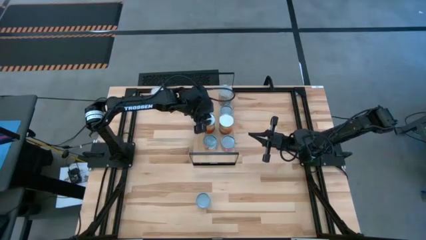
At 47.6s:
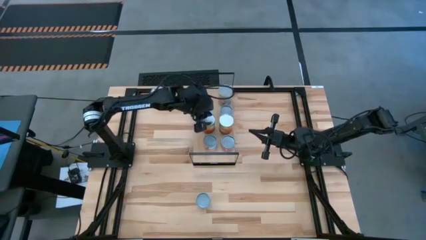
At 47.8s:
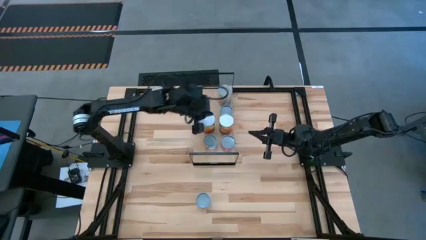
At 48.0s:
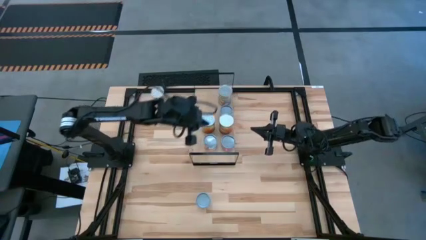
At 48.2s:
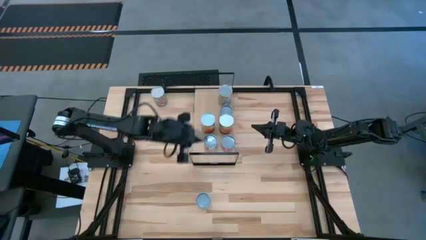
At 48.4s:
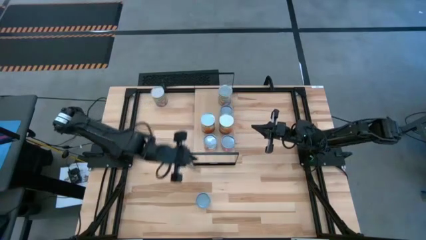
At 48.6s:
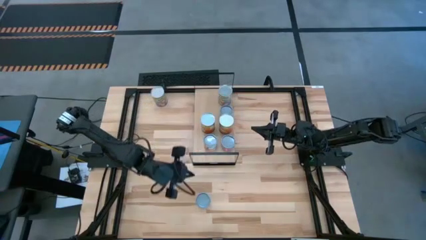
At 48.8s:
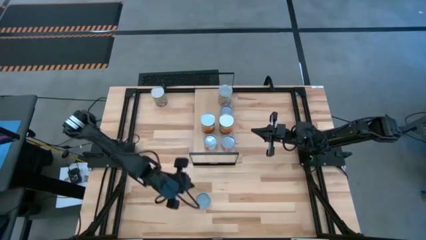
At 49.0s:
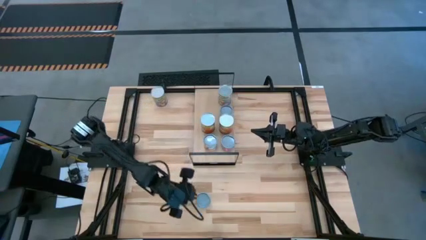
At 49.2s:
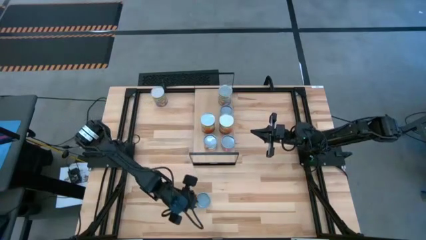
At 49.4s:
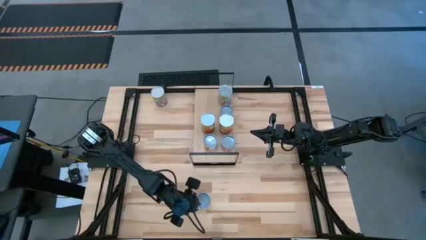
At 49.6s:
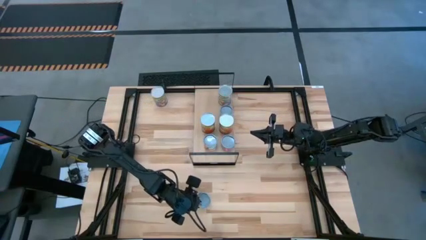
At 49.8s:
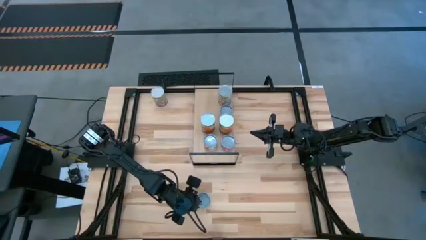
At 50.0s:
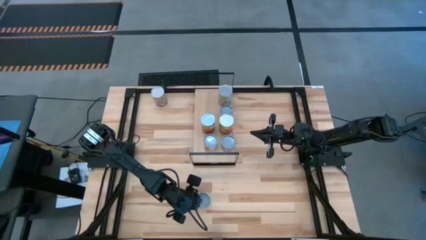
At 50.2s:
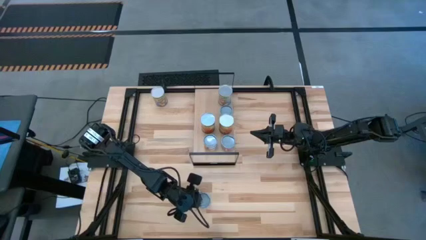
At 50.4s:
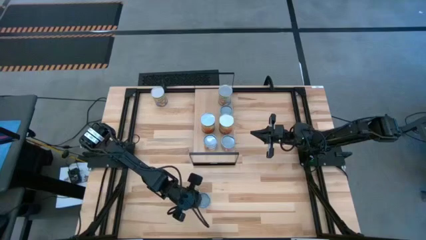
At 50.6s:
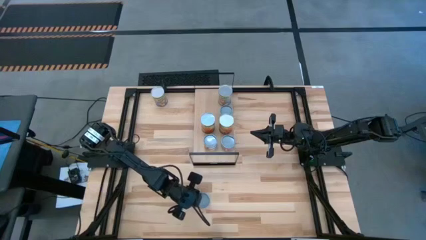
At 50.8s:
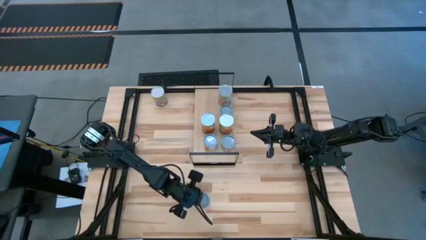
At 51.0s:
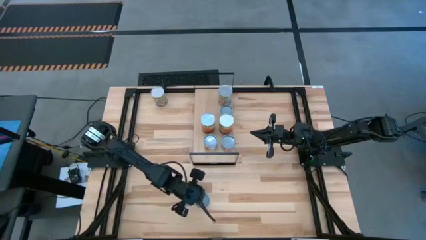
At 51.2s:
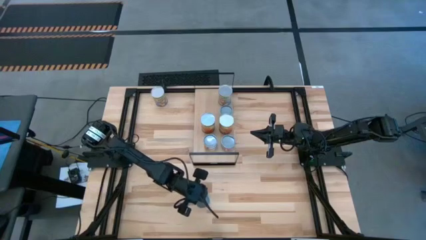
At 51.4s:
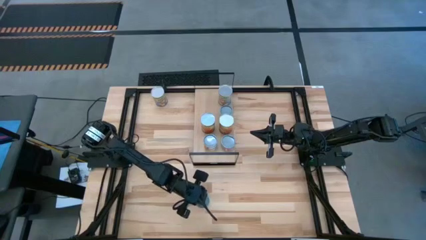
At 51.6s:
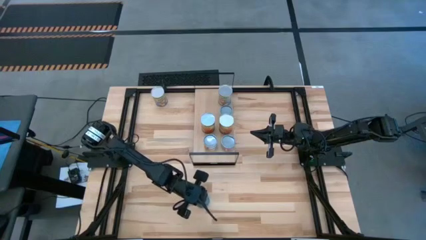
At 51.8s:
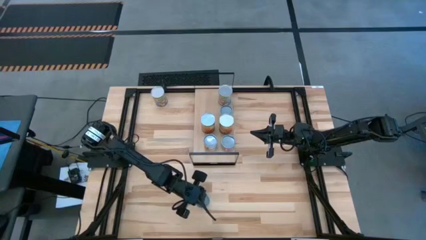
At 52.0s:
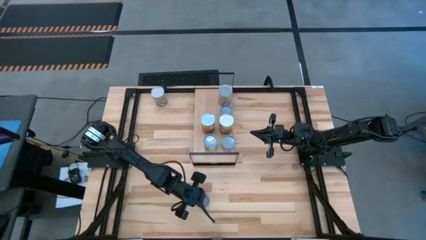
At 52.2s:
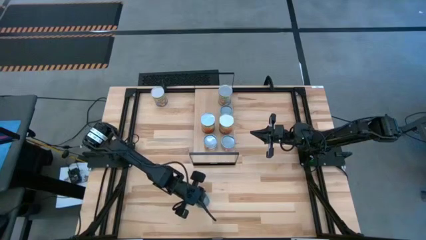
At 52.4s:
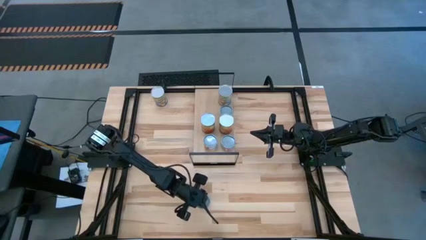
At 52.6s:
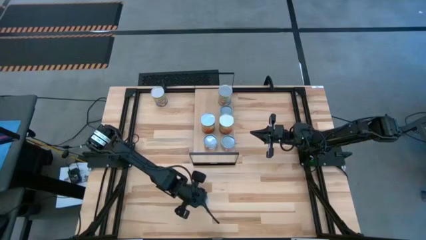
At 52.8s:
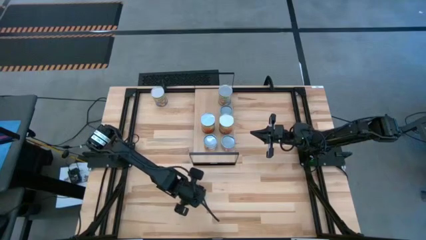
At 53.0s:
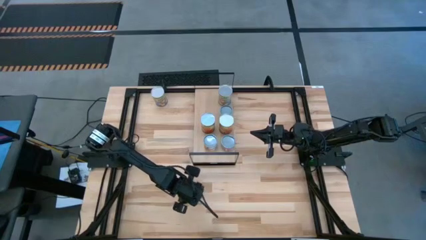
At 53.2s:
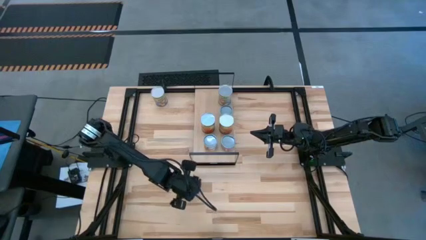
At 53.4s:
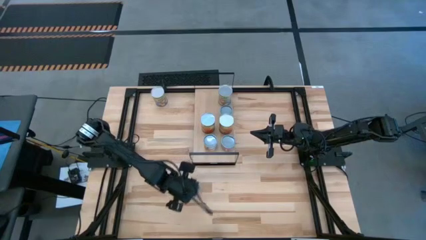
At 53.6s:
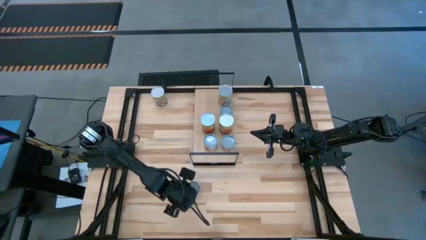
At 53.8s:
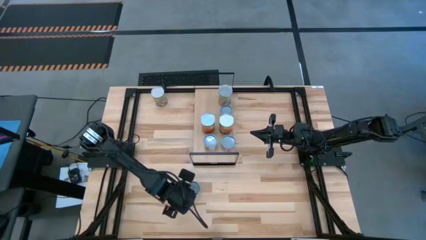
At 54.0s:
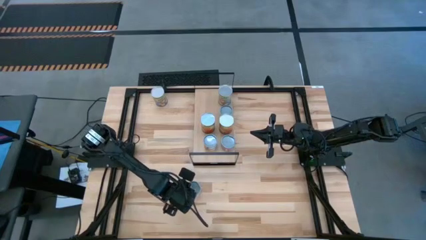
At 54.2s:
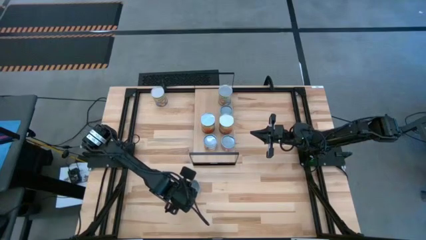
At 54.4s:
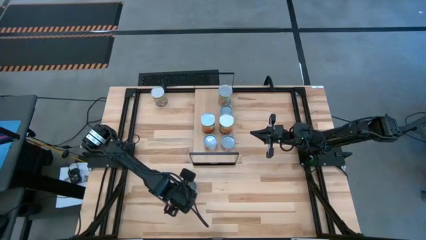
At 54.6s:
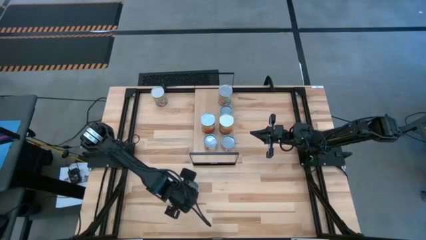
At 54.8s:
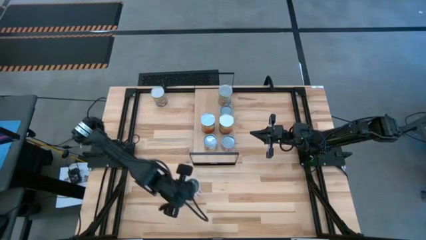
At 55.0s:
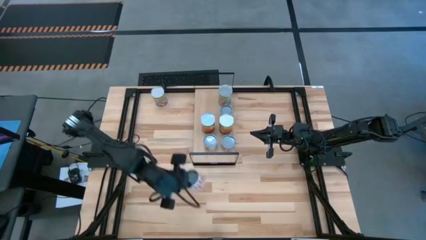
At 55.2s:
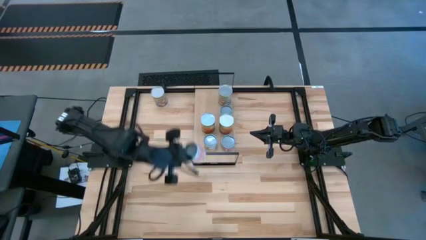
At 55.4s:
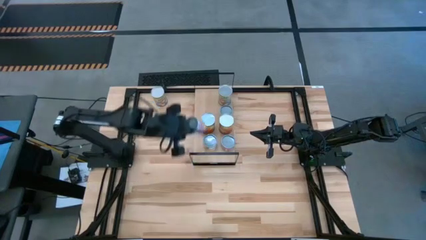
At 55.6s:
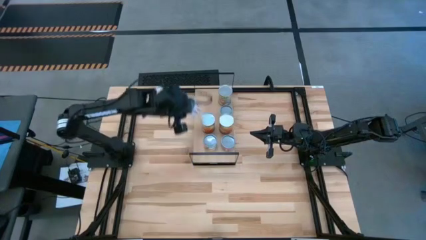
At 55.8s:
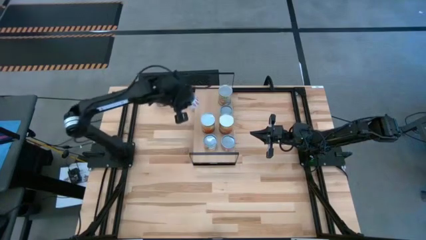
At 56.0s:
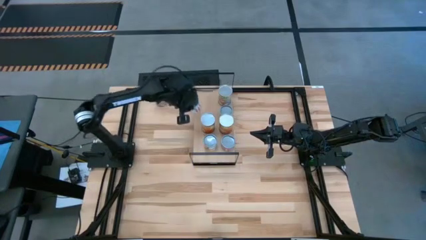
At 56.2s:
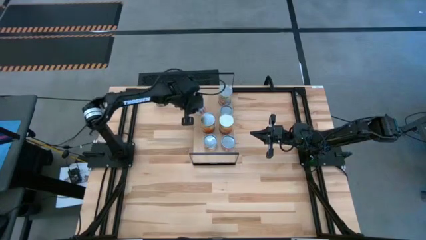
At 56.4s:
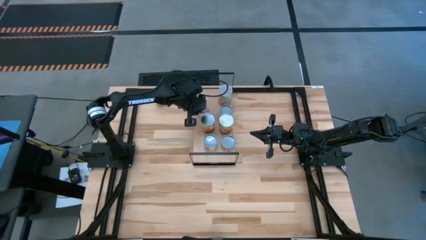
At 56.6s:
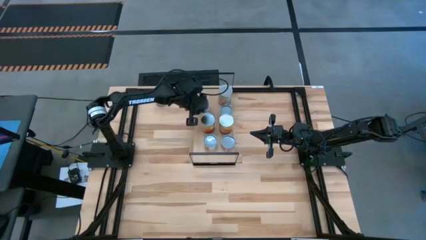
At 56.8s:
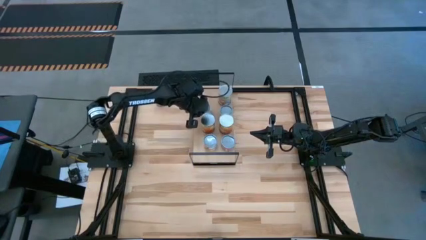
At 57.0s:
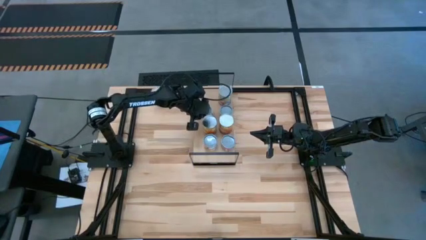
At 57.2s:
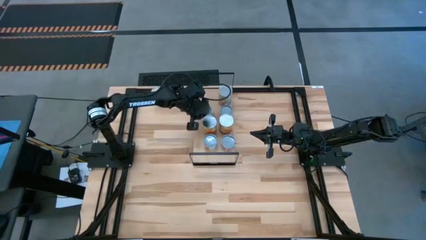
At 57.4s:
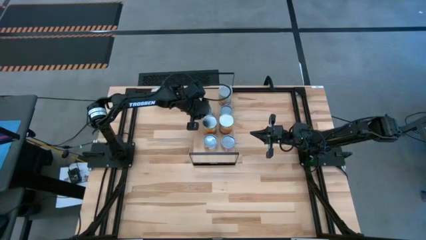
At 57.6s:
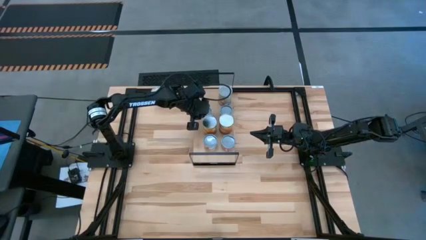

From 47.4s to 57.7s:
Task: Pick and place cans onto a shelf
Put the canned carrots on the shelf

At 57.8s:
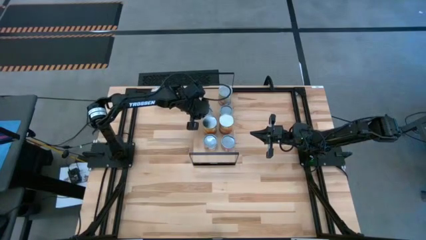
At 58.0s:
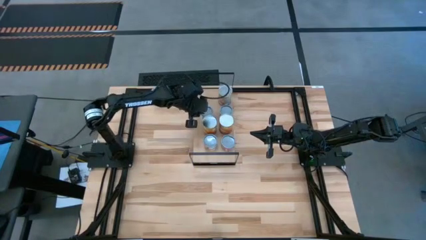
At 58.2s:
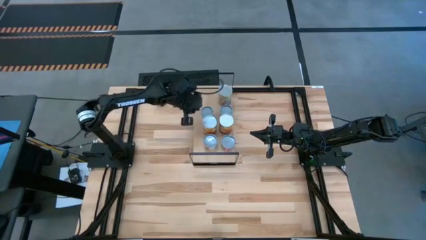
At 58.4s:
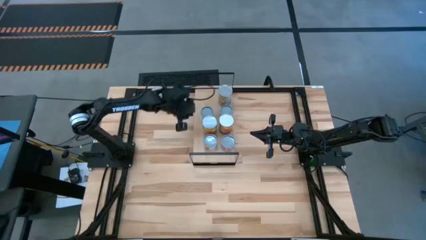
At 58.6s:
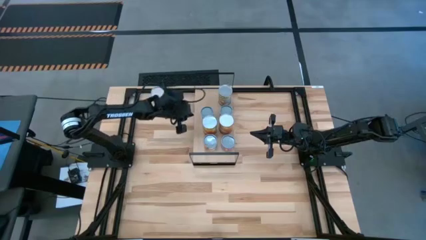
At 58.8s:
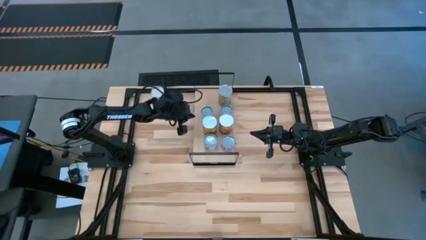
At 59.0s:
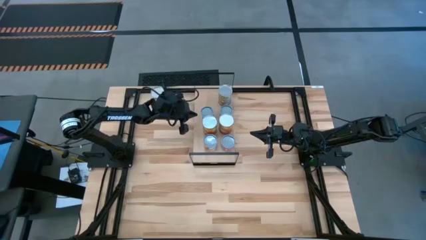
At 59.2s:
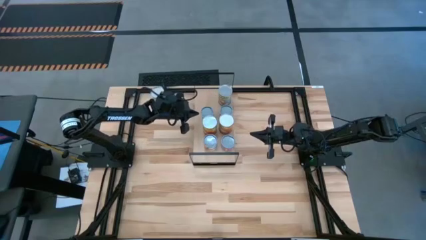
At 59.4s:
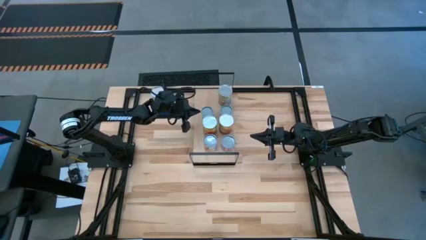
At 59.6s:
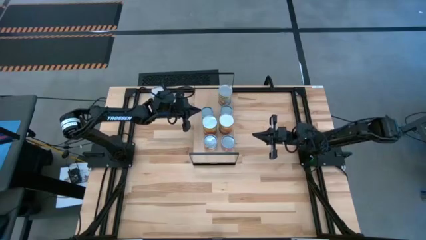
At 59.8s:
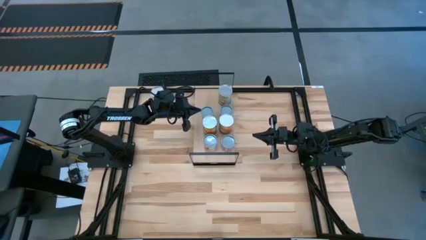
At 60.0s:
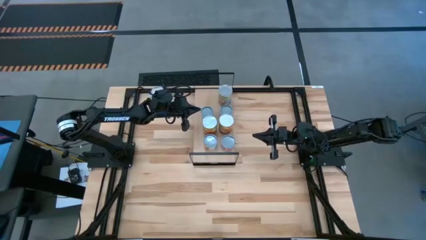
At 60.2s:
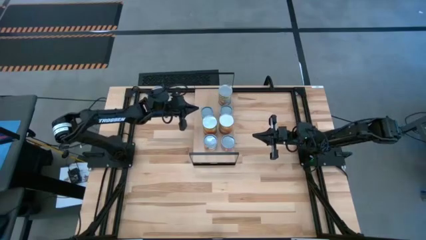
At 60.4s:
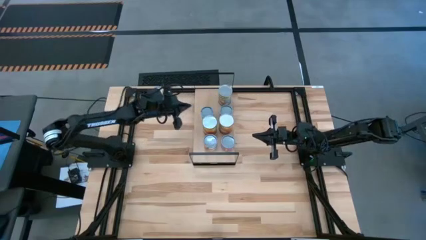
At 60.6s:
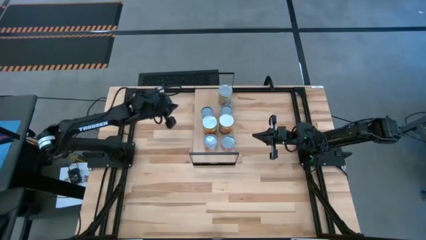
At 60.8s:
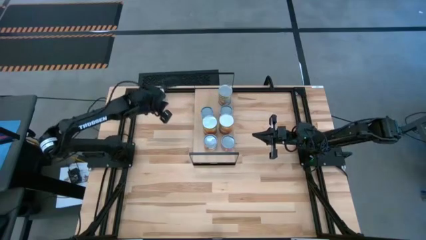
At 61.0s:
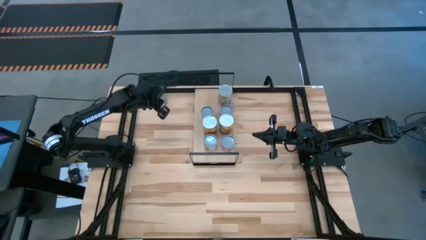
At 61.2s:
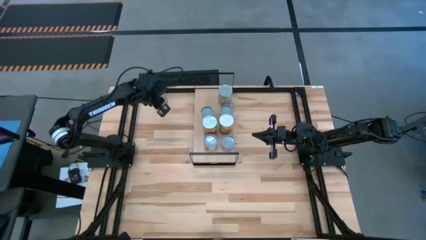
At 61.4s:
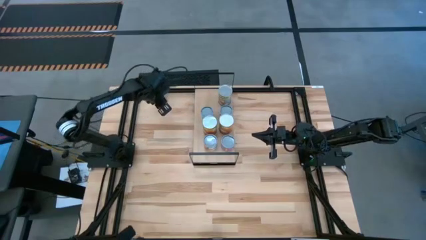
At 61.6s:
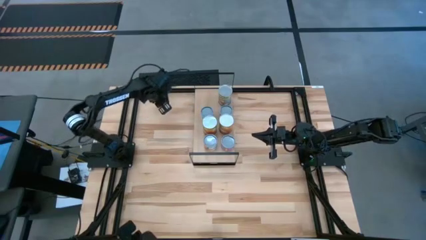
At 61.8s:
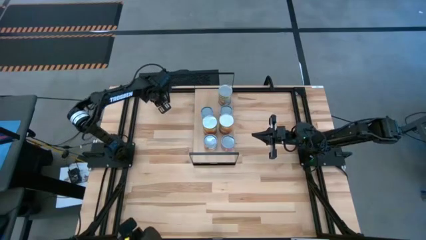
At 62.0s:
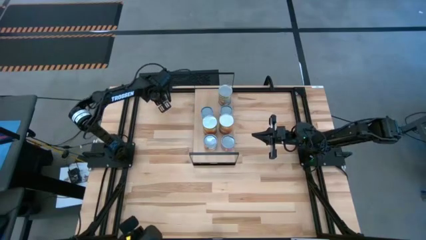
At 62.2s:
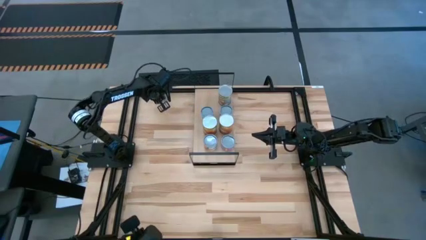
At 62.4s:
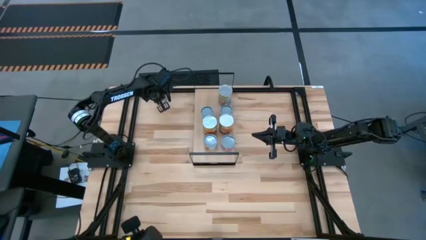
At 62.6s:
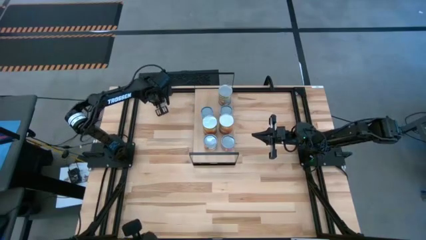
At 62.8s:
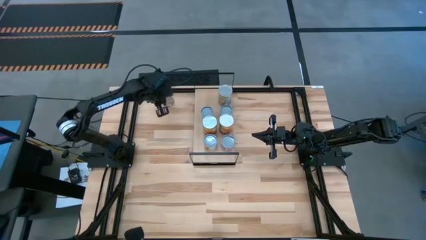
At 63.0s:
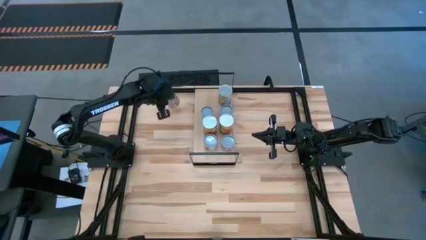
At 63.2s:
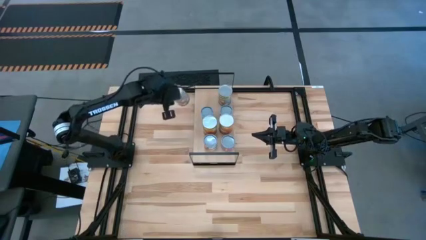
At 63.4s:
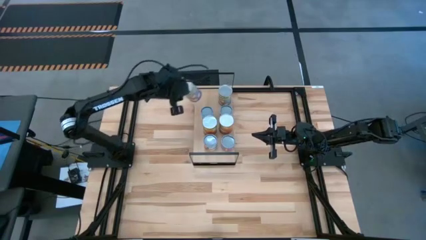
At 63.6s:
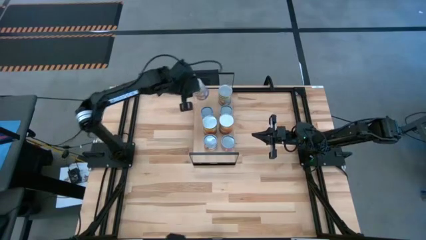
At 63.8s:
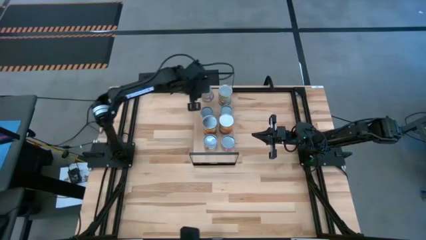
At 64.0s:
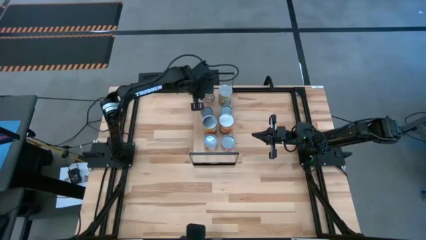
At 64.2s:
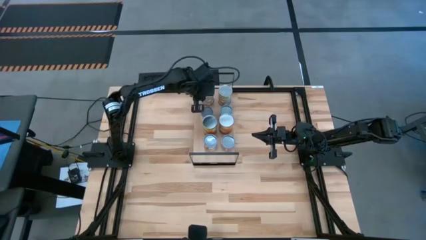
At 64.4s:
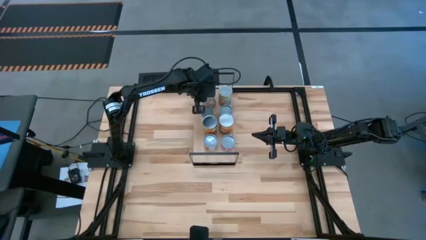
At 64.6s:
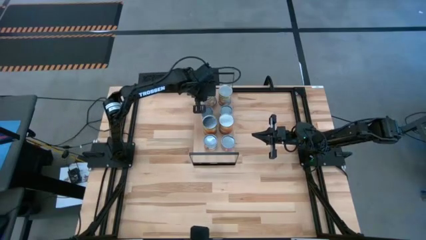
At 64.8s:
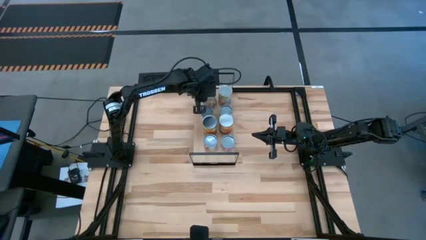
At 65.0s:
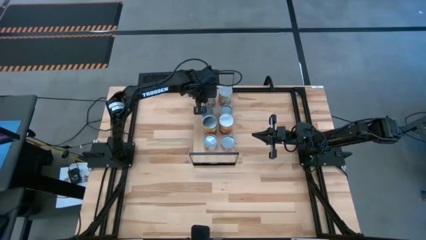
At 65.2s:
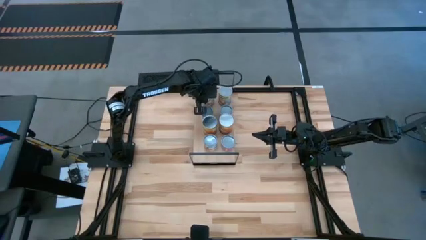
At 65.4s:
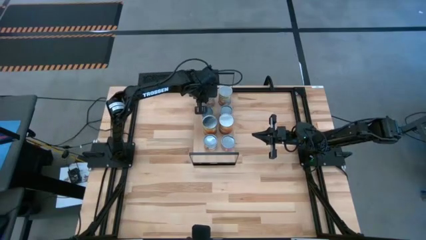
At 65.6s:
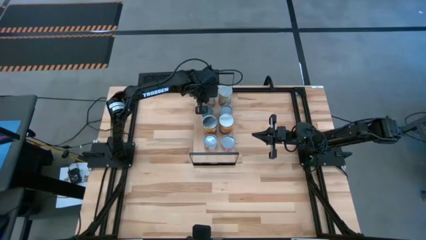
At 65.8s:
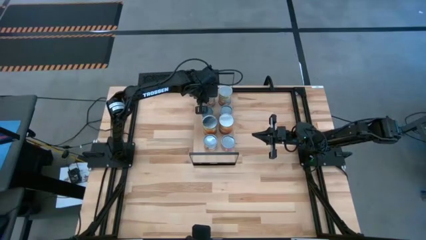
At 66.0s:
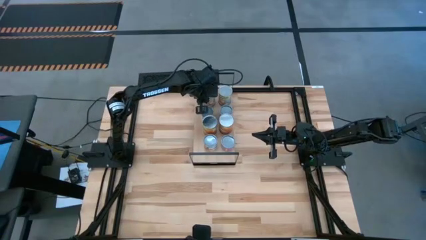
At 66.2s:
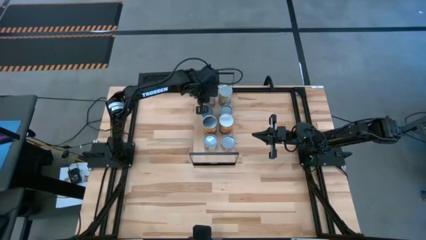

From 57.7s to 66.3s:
Put the canned peaches on the shelf
